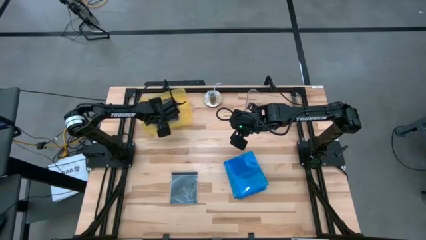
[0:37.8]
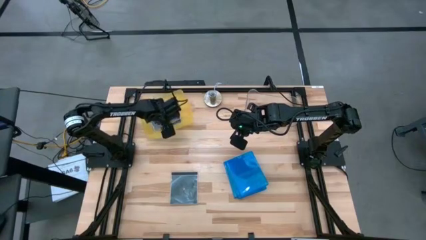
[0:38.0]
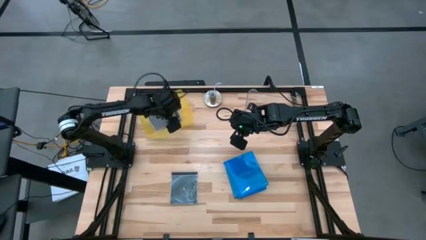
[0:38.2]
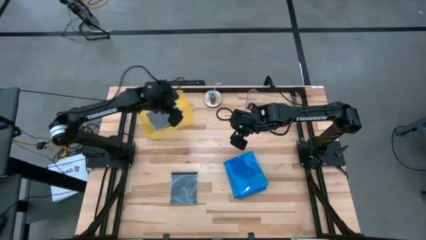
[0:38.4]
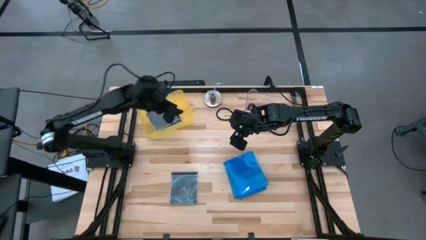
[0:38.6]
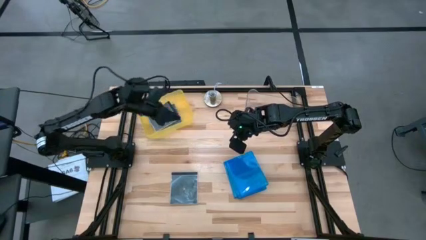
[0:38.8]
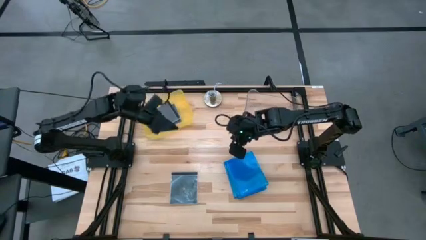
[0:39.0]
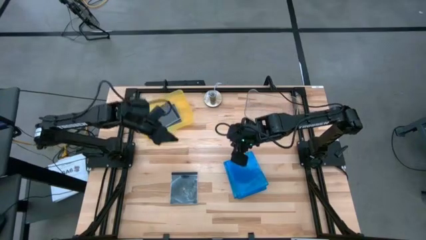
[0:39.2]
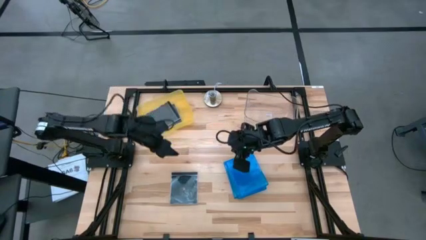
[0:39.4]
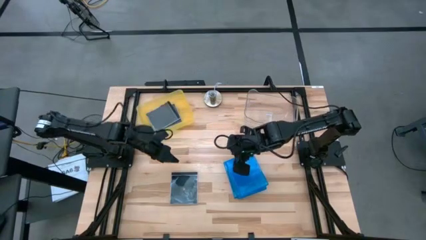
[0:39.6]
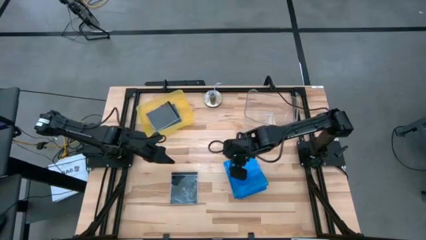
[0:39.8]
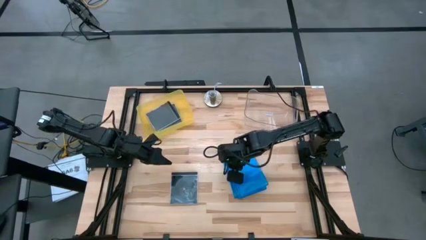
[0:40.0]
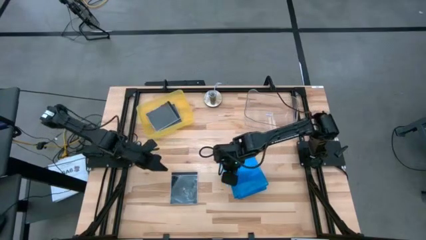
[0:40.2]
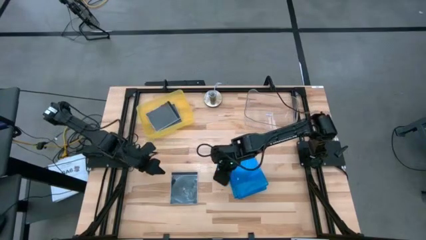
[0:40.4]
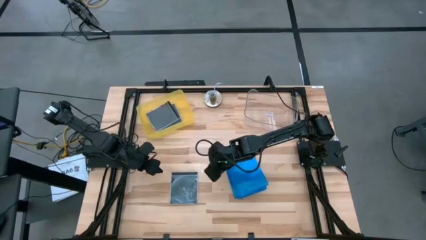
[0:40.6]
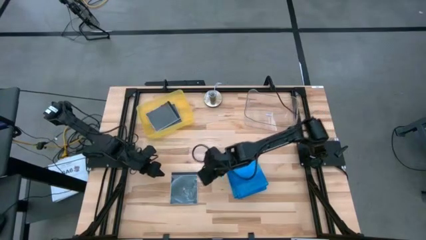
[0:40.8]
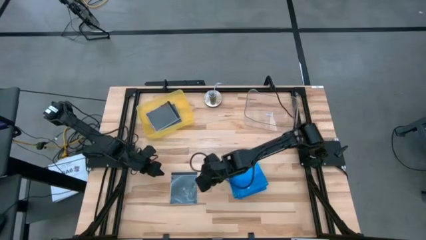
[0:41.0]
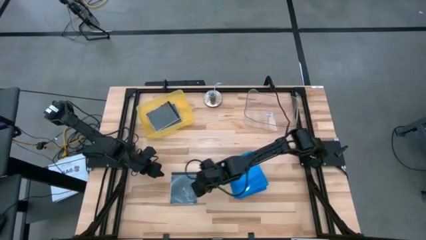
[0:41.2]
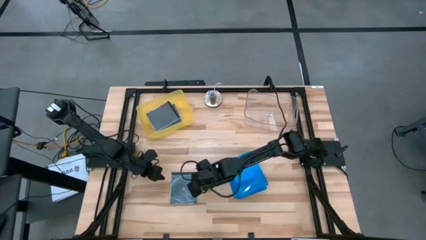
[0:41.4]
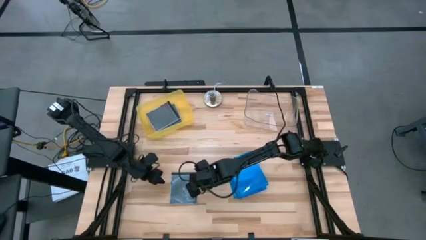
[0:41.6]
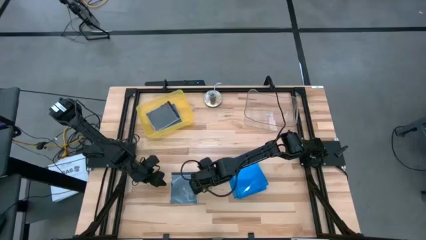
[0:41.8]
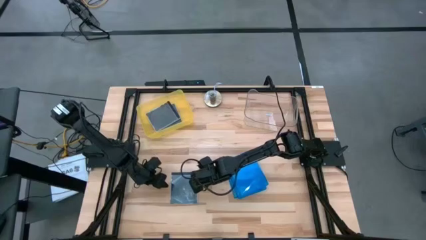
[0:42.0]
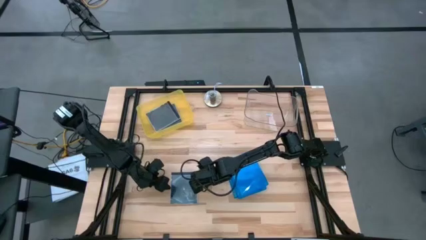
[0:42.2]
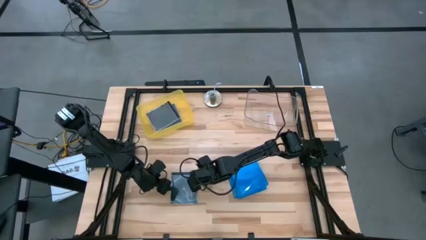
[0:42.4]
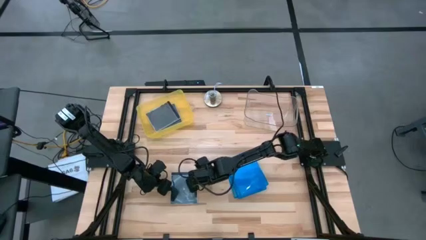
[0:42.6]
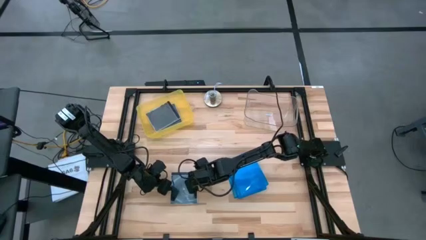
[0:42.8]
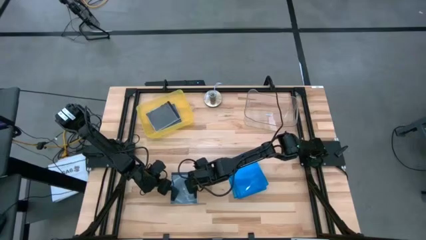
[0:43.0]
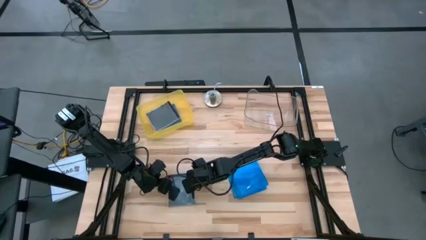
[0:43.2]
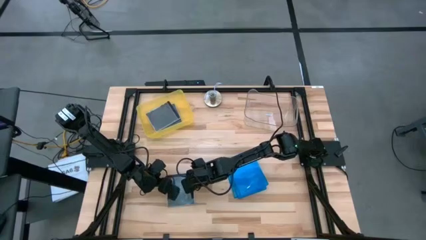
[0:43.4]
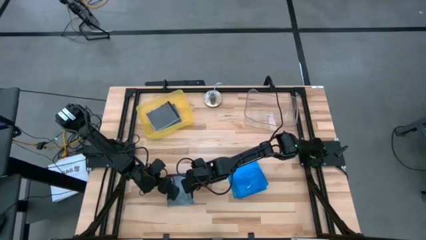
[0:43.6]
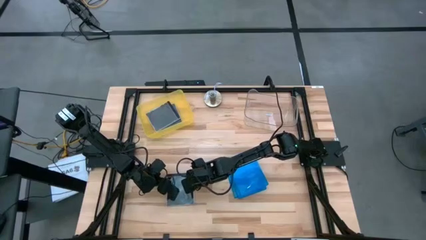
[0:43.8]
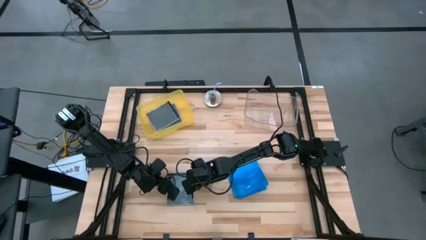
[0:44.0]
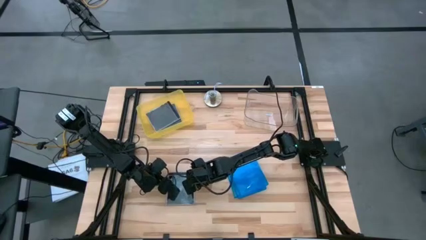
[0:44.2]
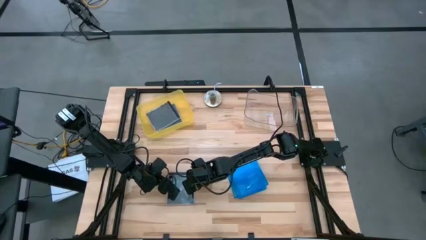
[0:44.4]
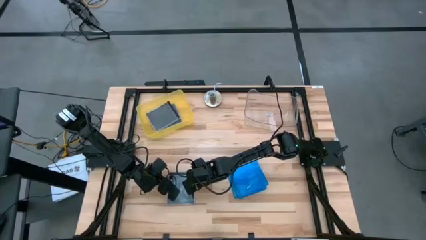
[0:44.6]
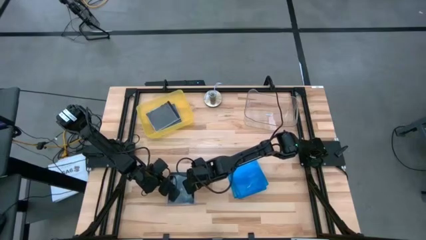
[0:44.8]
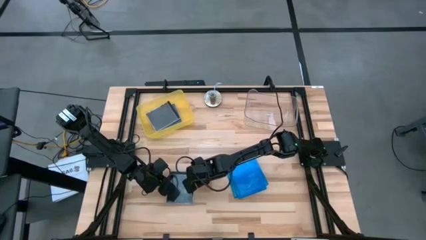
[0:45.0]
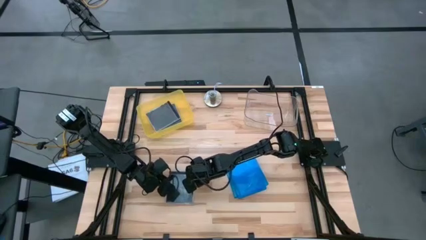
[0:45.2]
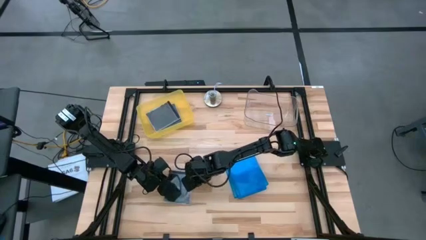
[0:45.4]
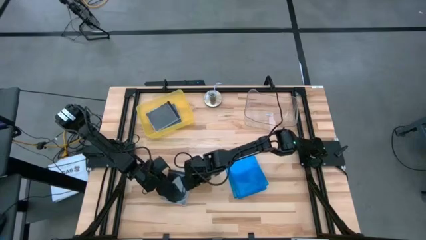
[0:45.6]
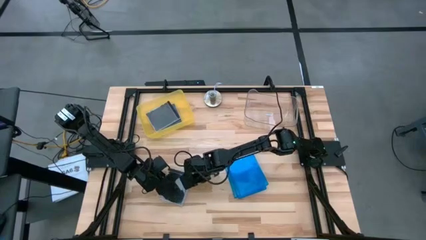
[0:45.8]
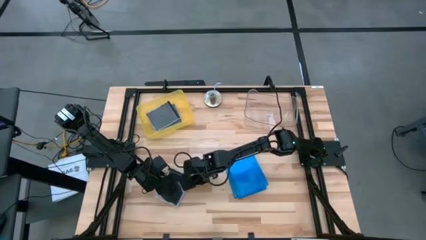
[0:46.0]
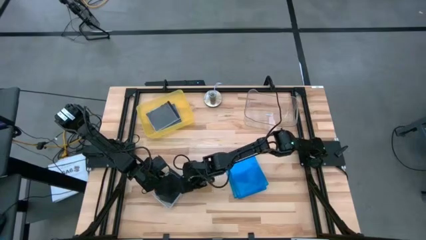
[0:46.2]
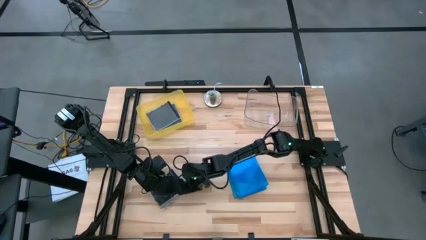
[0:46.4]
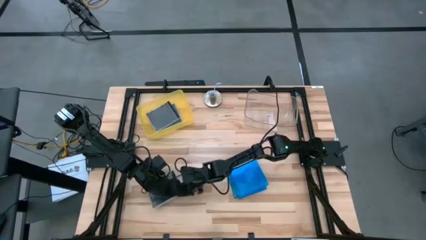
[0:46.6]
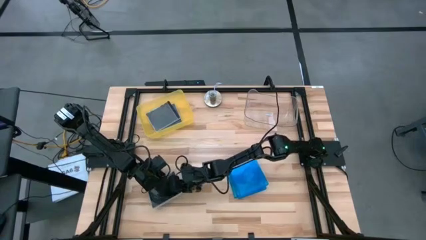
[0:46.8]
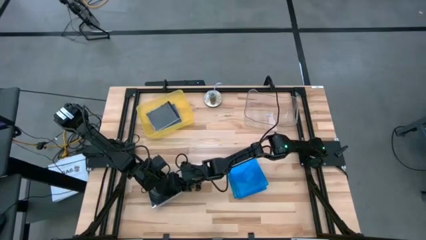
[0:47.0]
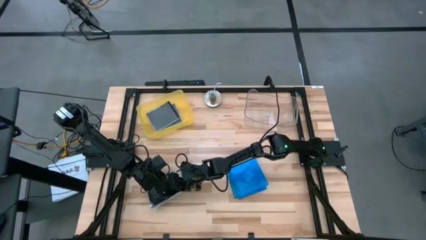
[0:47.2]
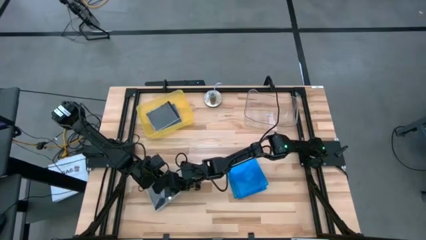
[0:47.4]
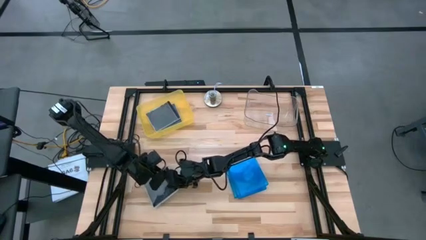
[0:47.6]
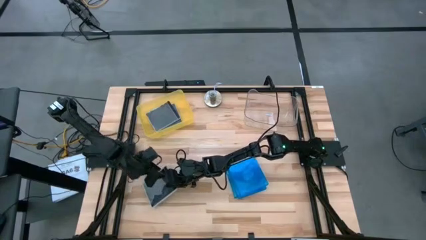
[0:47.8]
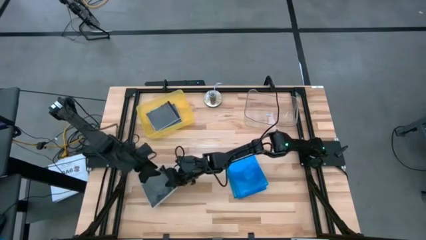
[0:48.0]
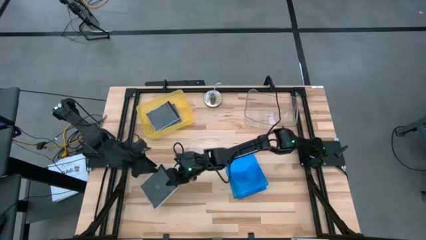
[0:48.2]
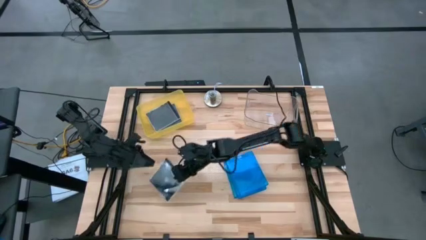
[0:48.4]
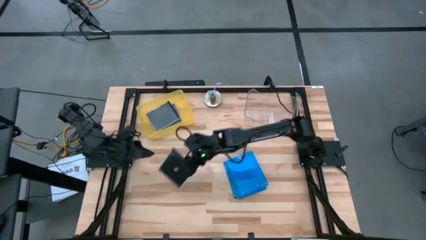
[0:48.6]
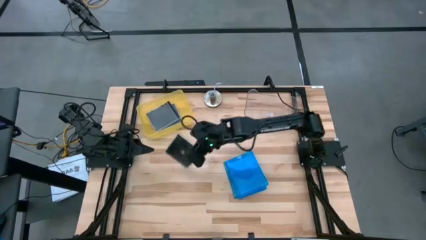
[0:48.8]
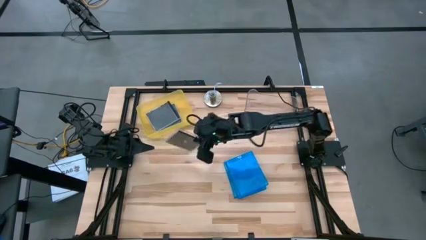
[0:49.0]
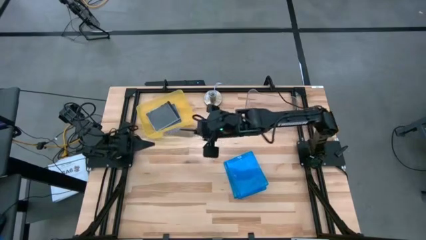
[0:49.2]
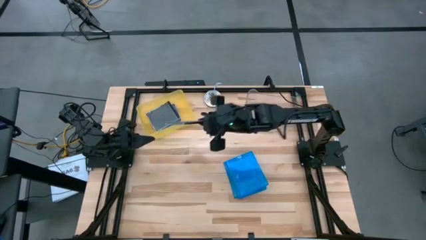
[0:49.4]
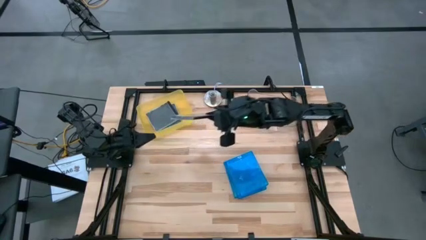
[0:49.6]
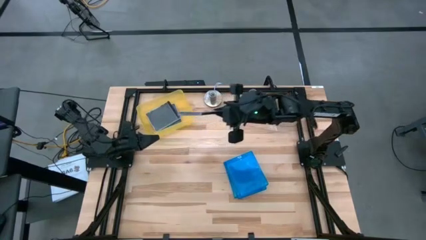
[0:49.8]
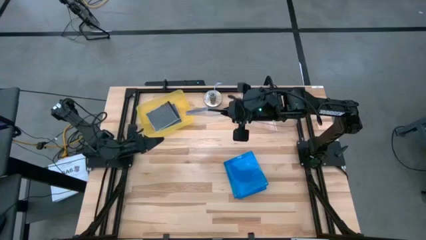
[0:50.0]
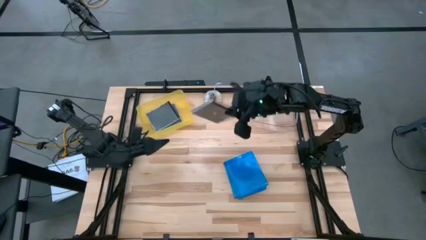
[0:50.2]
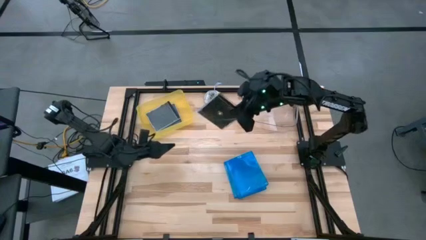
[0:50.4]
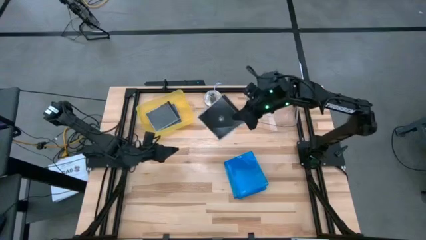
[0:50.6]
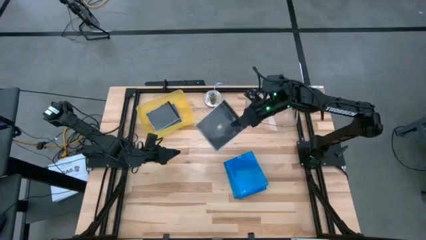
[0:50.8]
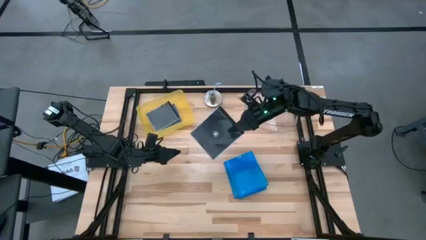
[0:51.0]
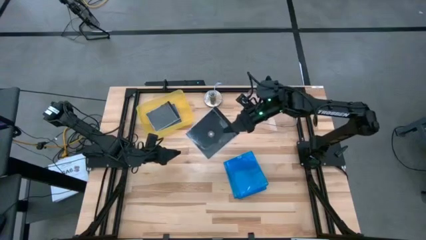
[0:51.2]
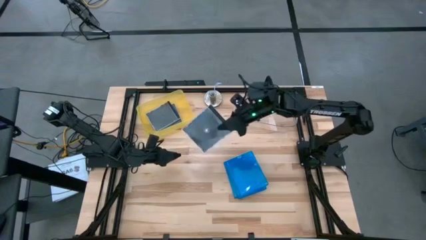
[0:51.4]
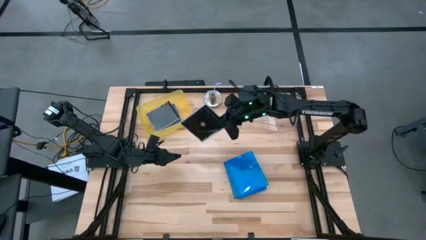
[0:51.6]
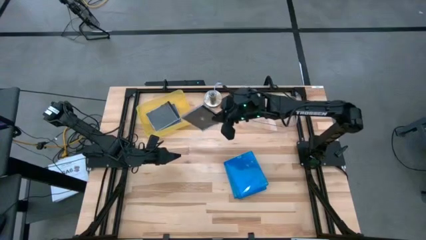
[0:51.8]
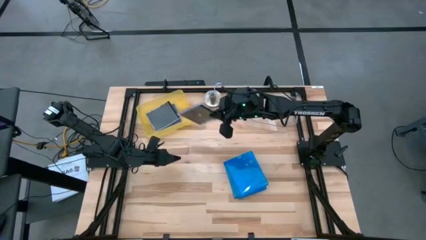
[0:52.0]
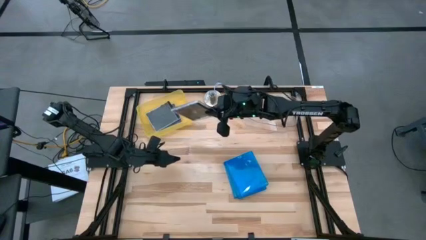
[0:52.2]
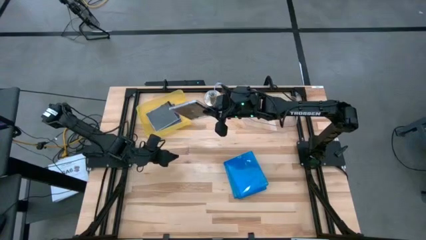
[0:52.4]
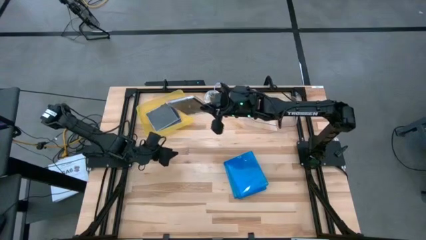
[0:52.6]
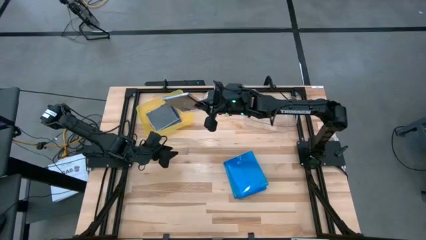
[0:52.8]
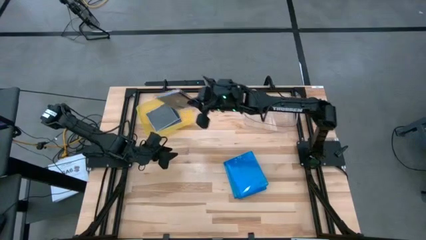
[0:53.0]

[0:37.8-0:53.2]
Task: Pick & place jewel cases by type
Put the black CD case into the yellow bin

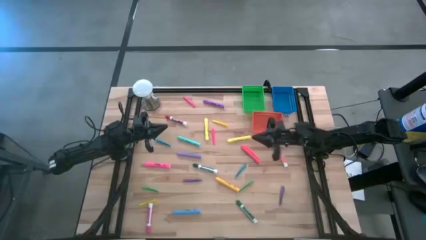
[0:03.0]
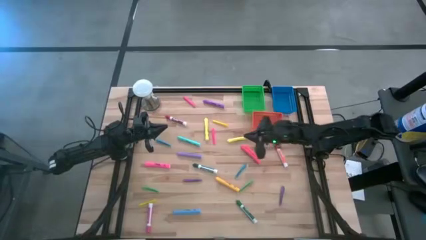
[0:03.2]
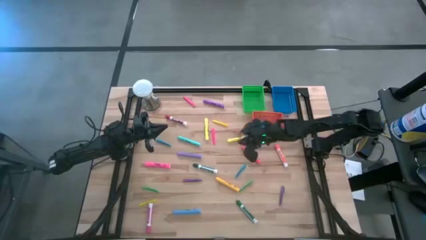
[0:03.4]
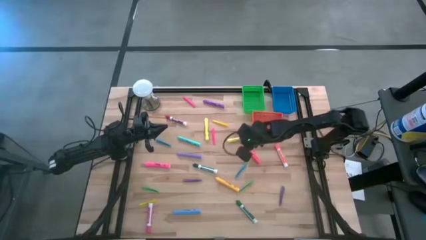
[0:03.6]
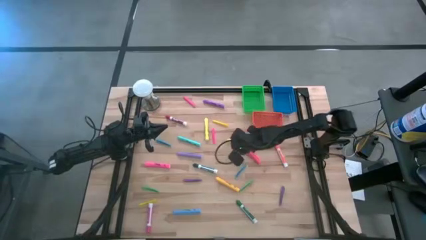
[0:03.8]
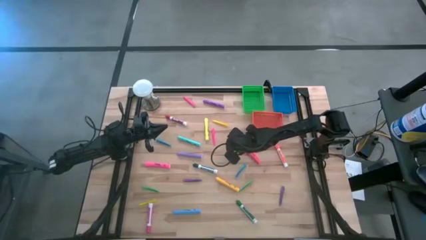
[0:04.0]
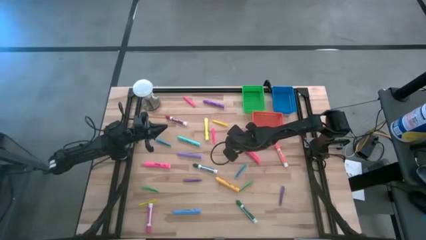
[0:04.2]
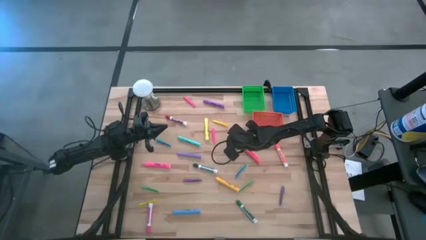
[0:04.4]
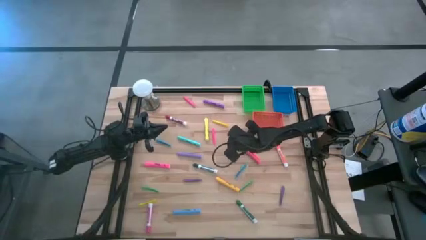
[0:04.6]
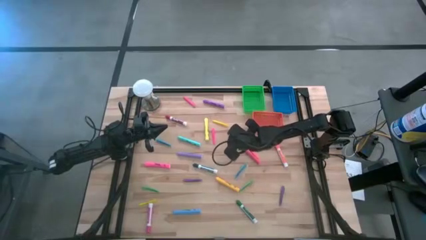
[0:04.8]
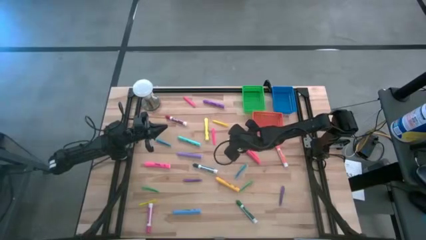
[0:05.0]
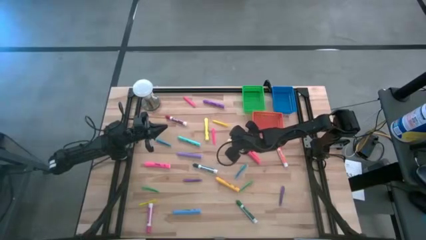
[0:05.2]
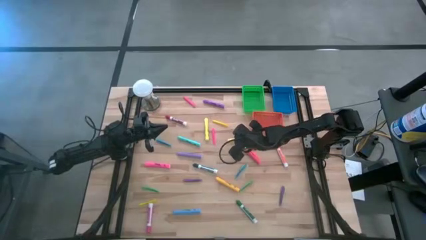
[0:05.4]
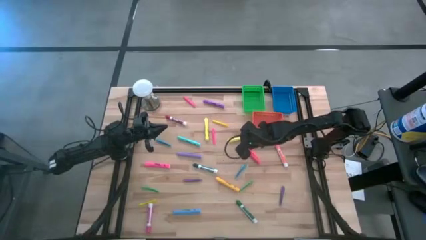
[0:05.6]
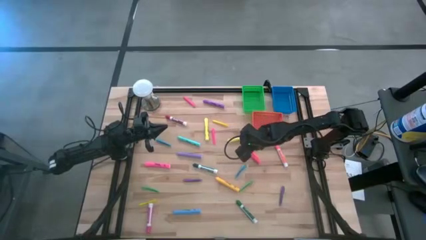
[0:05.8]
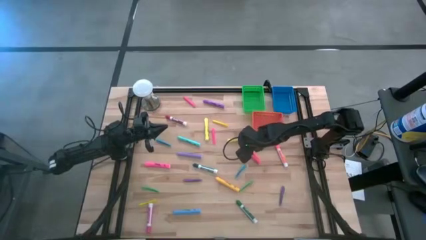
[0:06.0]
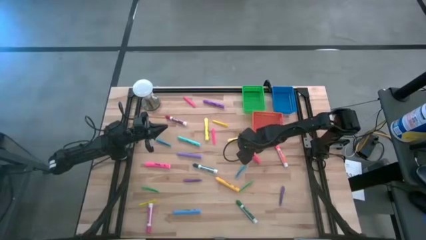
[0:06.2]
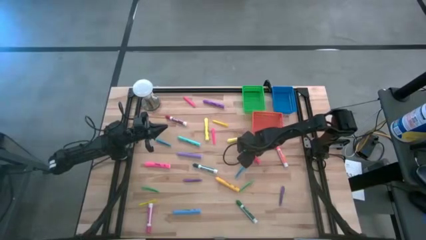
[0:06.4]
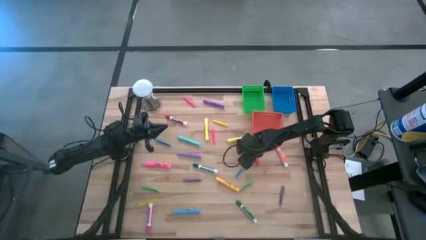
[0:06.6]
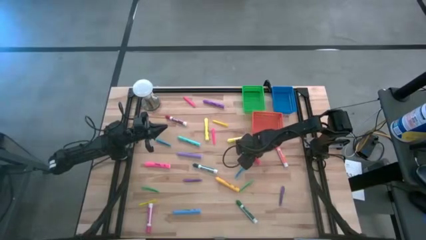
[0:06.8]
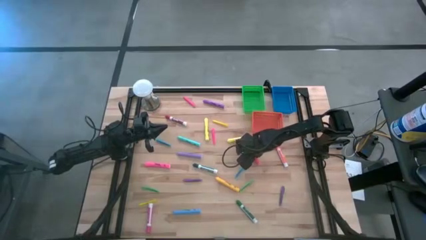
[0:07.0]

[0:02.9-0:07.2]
Task: Pick & Place Markers
Put the right pink highlighter pen into the orange bin
